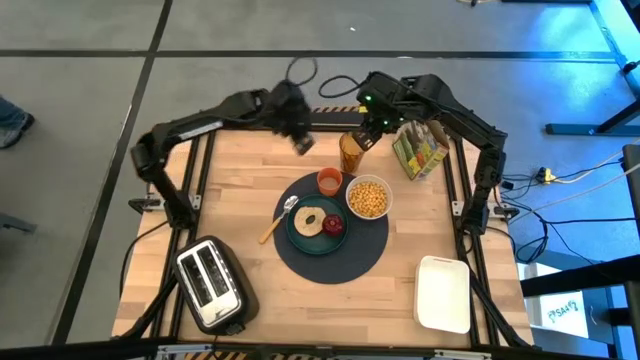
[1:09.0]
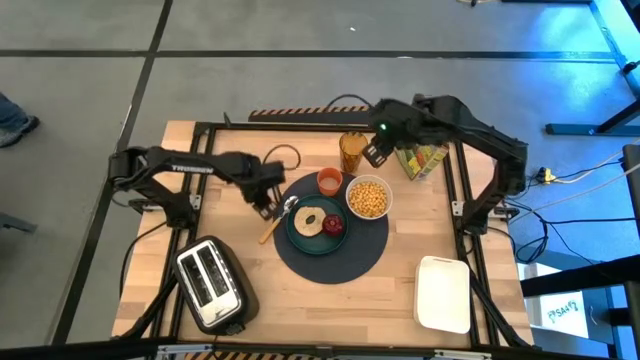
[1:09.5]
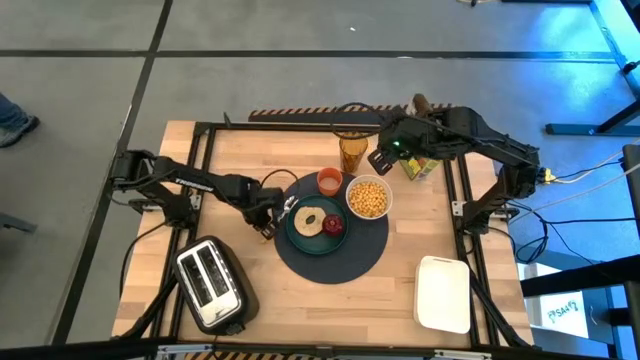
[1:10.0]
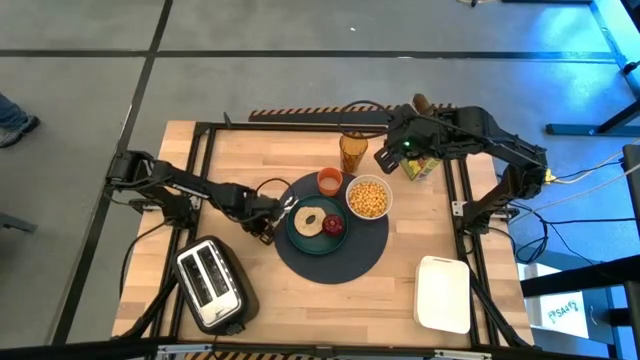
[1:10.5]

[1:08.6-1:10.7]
Task: Arrange a breakfast setting
Adjust the yellow spoon

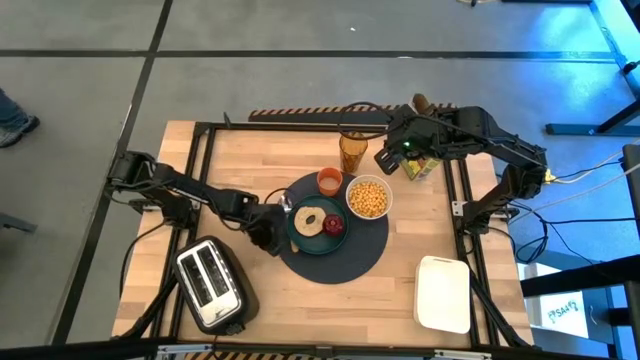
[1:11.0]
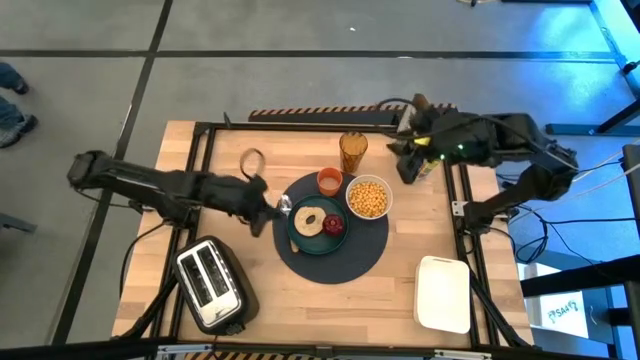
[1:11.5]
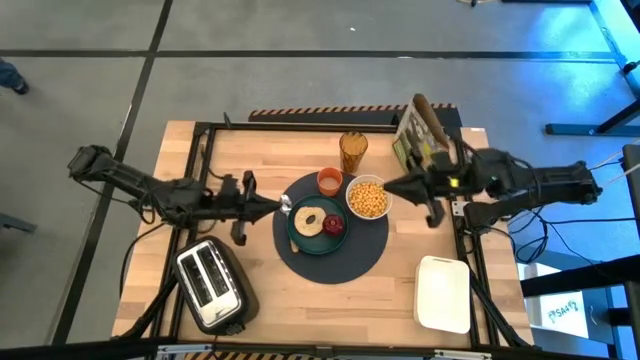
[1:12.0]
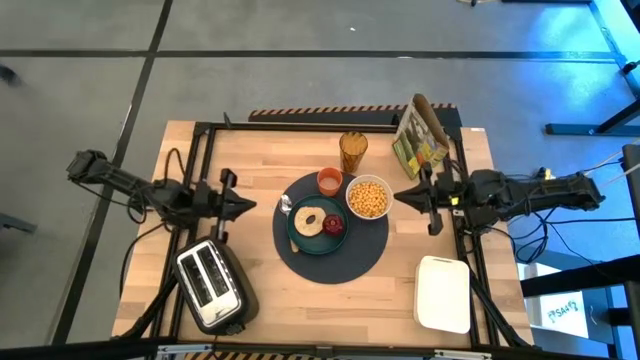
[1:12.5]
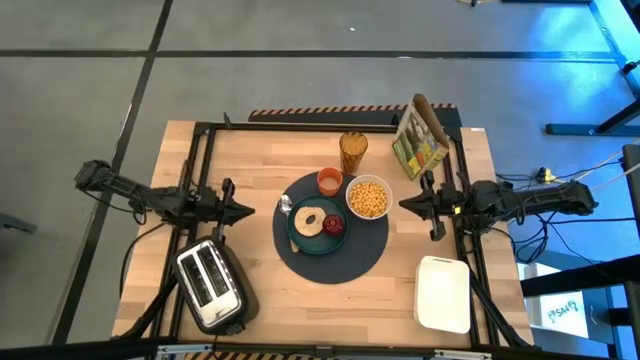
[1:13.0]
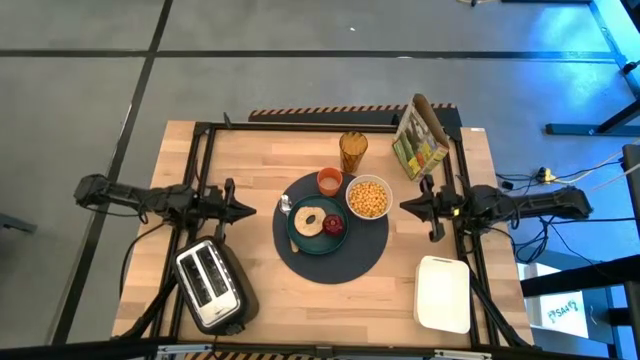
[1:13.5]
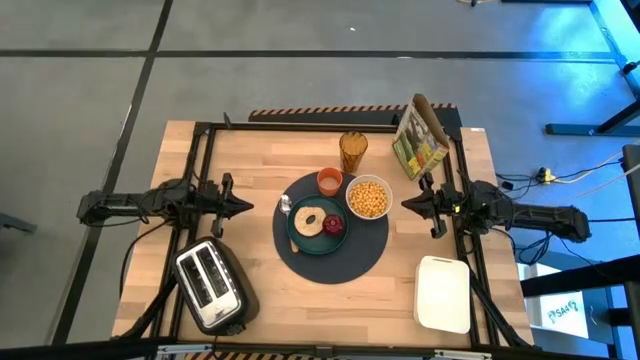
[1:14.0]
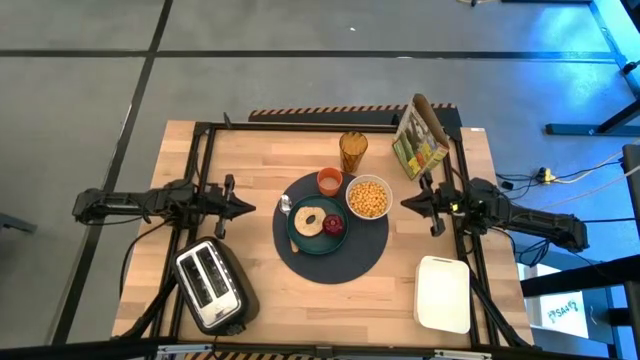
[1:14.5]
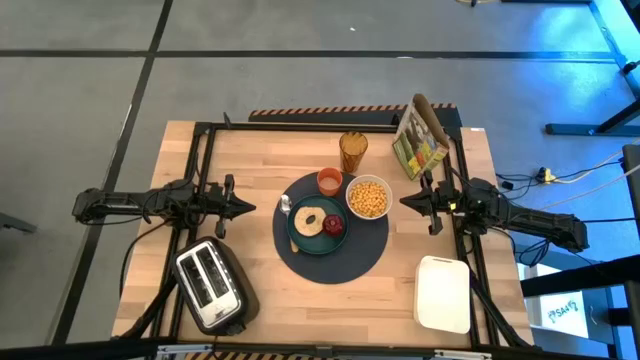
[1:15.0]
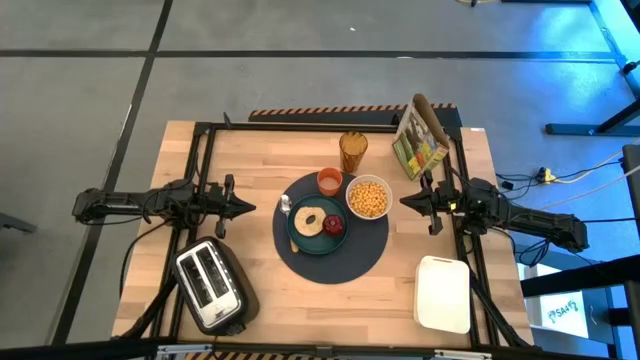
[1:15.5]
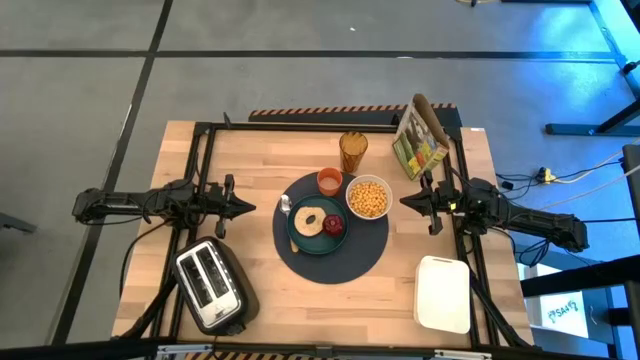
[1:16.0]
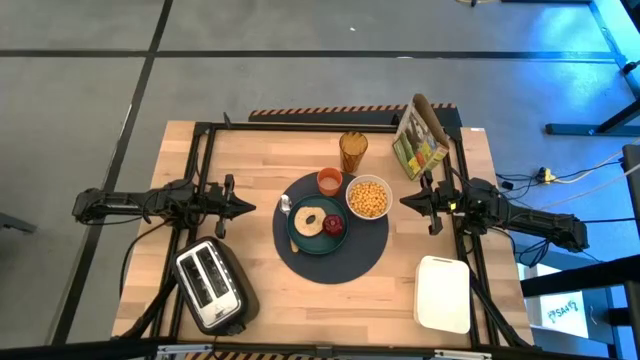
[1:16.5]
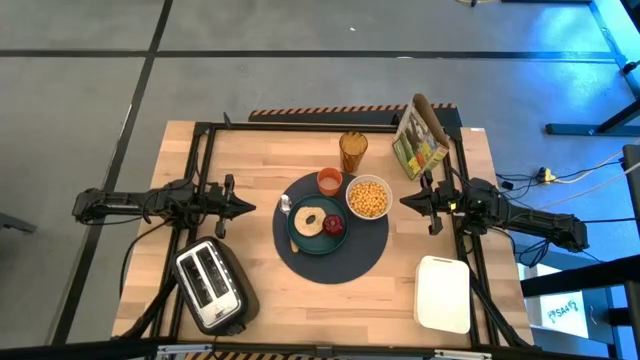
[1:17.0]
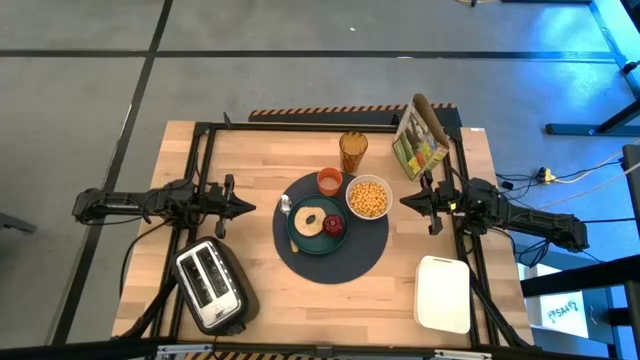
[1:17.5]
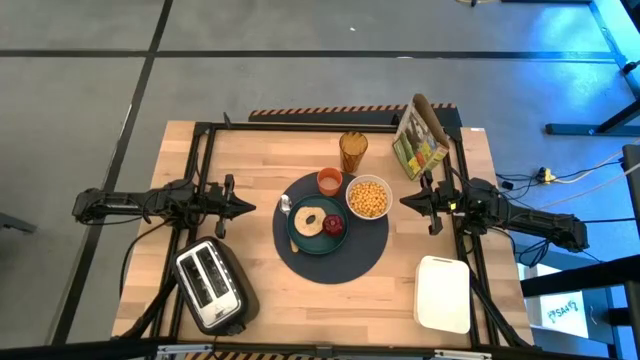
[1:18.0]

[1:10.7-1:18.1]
Return to Home Position
